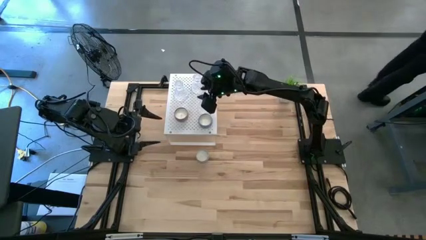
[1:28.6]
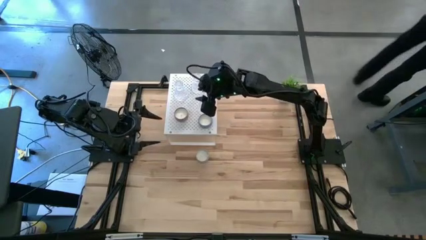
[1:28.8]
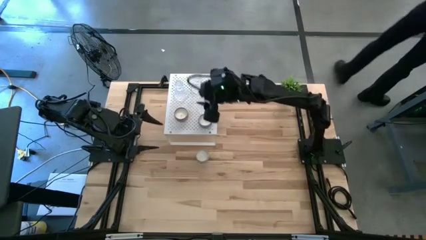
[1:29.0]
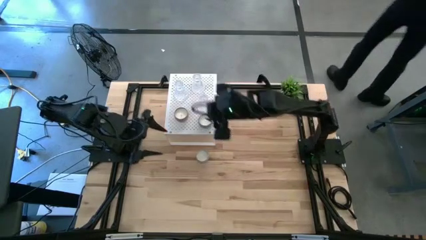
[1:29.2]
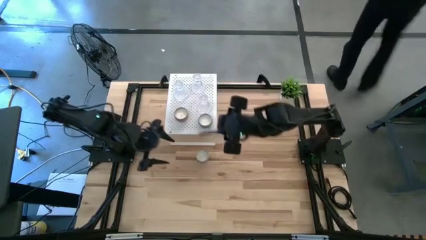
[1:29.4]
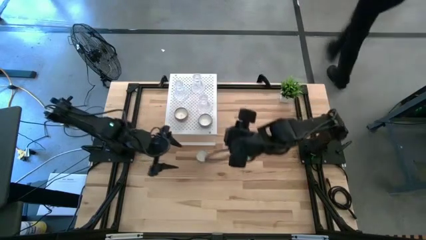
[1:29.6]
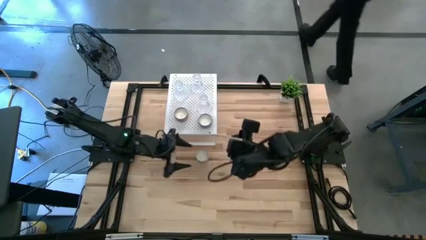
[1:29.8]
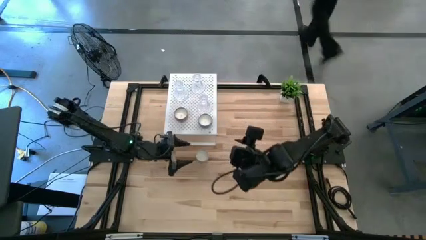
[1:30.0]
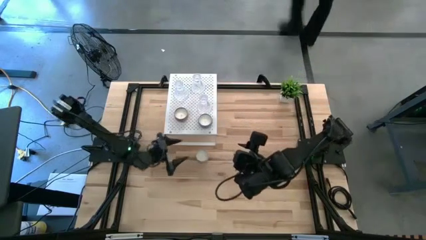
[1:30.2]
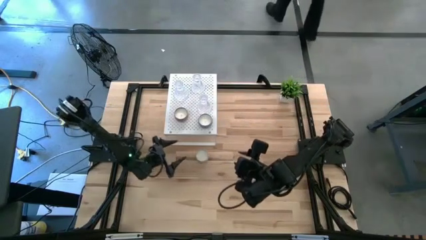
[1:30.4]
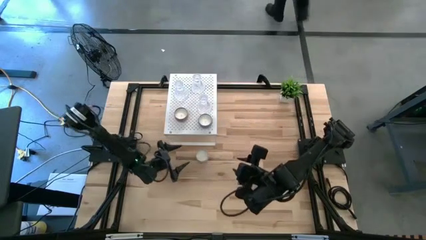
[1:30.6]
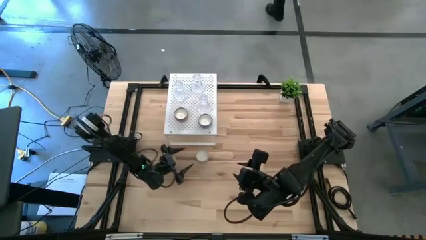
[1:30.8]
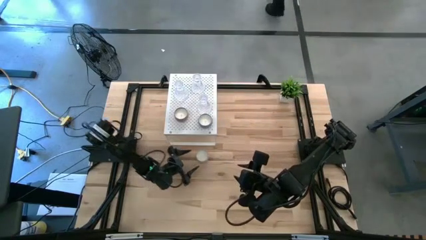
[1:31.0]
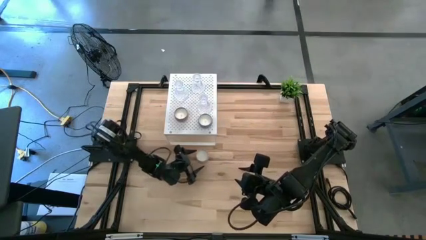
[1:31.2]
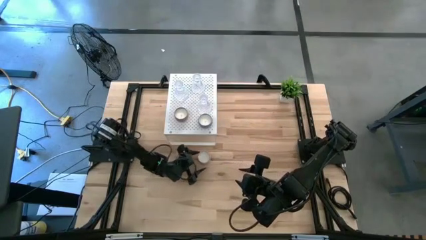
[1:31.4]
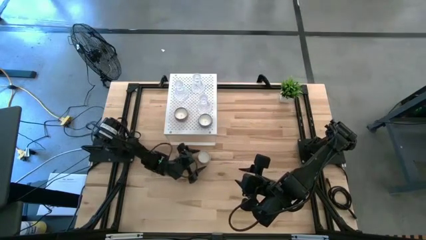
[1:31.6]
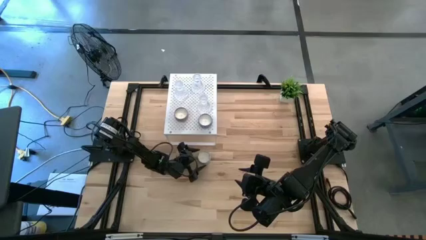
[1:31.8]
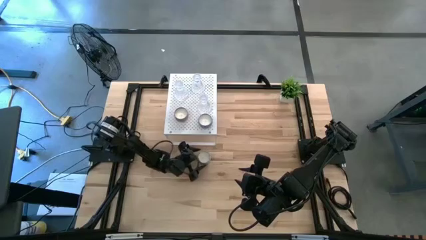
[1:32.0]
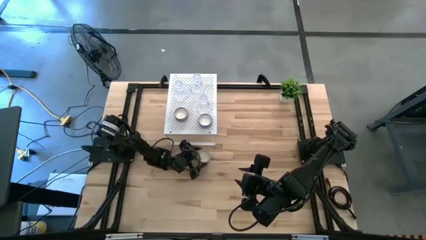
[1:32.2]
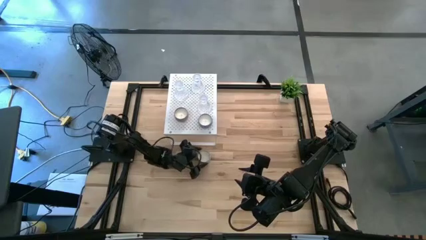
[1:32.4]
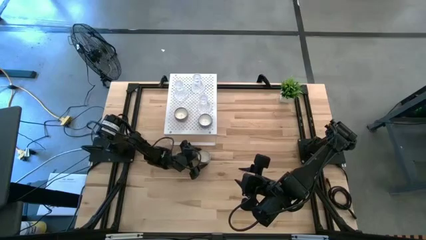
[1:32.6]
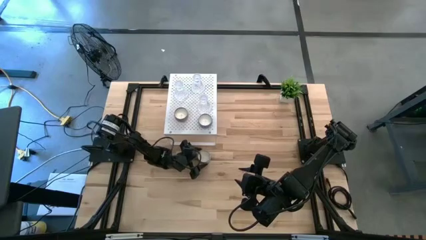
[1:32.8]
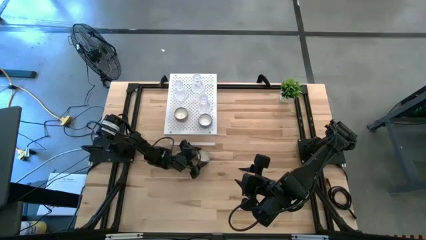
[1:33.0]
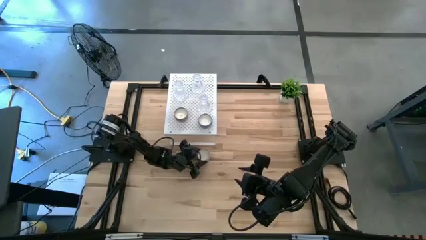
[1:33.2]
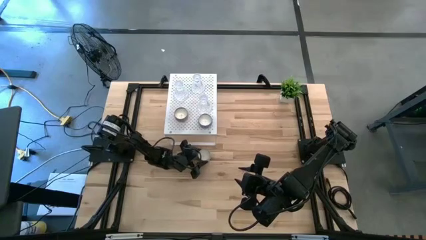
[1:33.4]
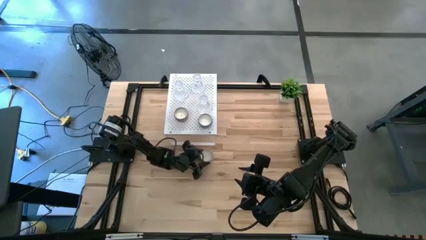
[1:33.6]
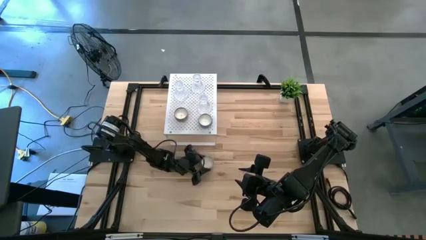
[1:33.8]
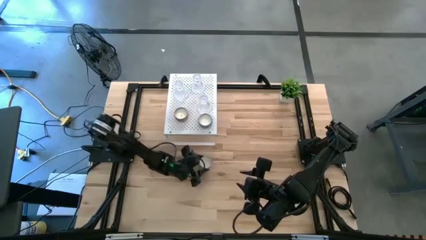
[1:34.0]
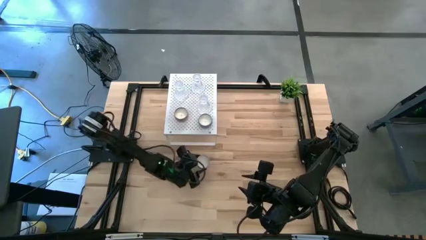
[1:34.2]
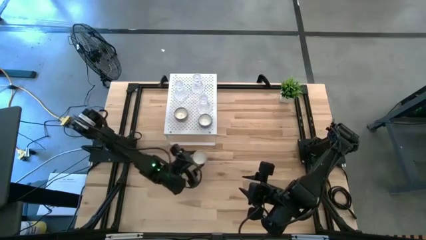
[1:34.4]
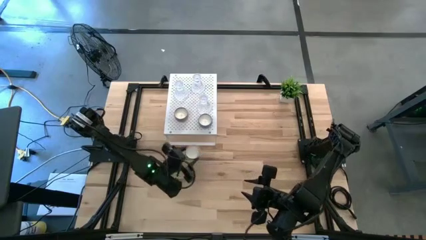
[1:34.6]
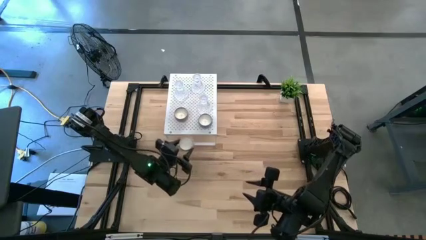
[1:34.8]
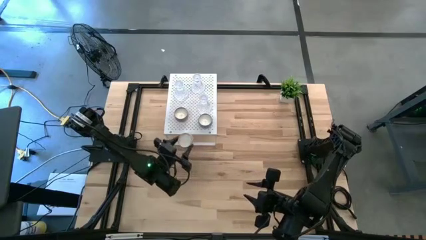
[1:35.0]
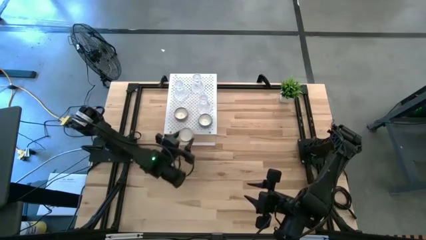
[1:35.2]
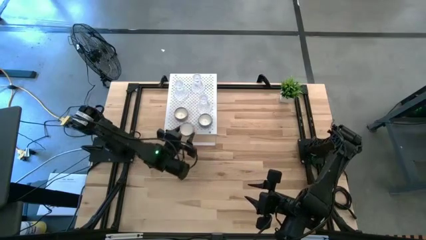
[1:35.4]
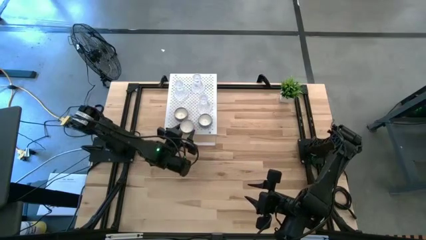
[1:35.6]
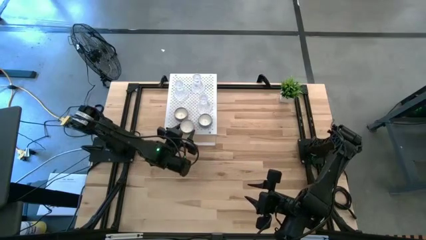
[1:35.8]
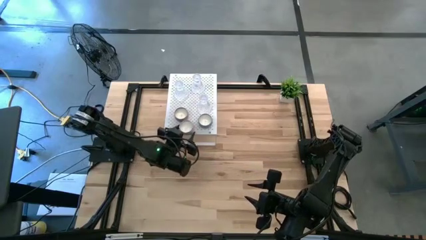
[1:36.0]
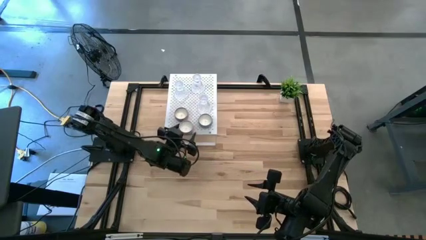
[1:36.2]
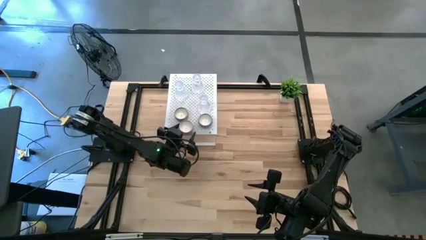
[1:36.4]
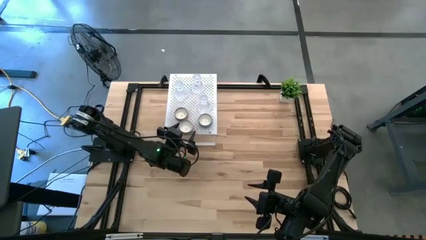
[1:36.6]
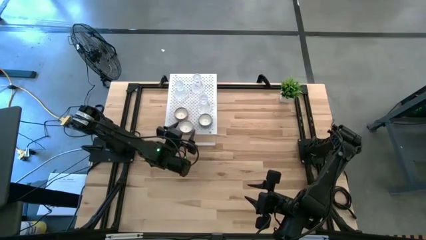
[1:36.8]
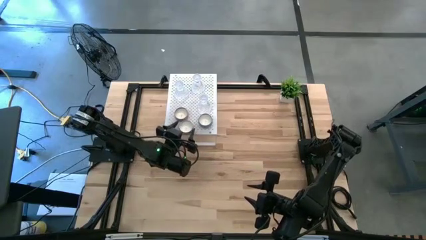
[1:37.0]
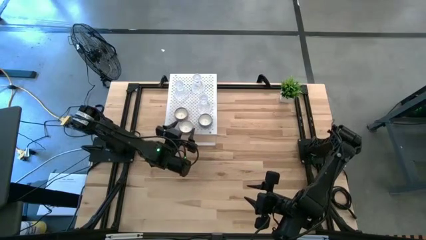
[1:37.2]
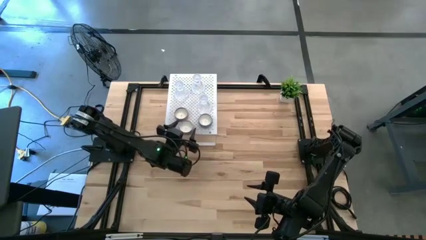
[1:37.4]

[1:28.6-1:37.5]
Task: Pick & Place candle stick holders
Put the red candle on the shelf

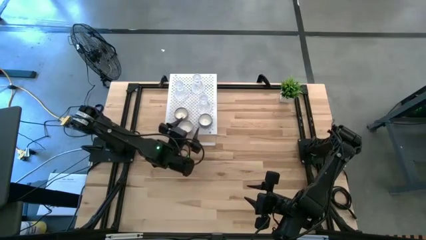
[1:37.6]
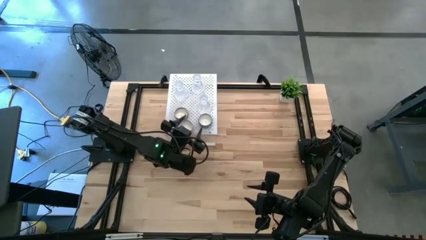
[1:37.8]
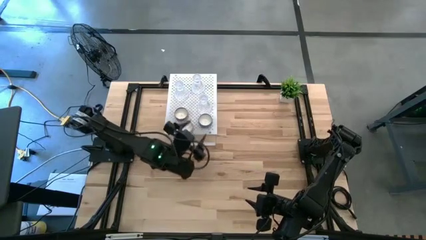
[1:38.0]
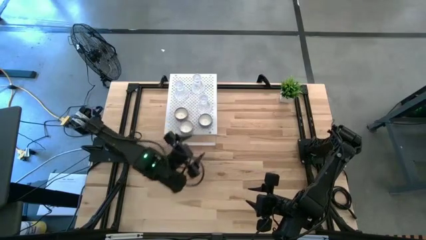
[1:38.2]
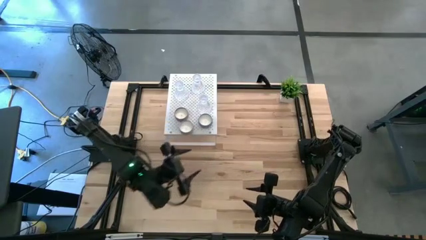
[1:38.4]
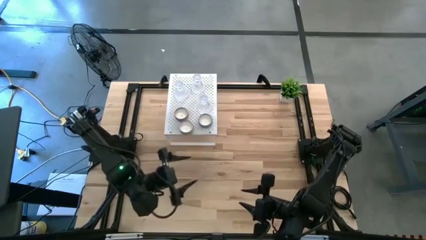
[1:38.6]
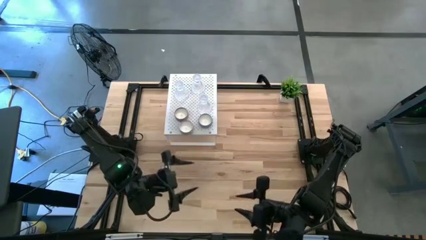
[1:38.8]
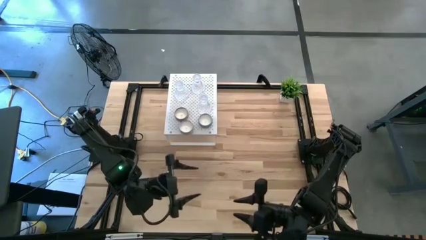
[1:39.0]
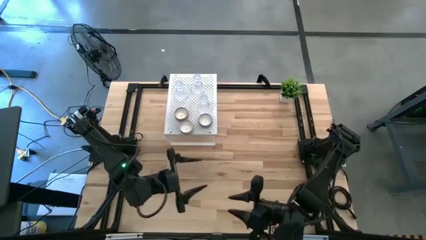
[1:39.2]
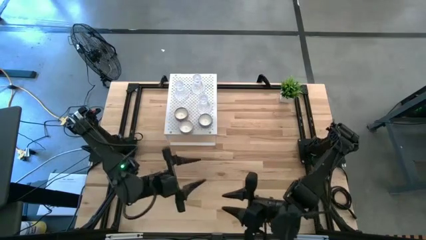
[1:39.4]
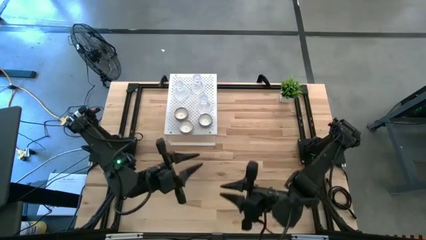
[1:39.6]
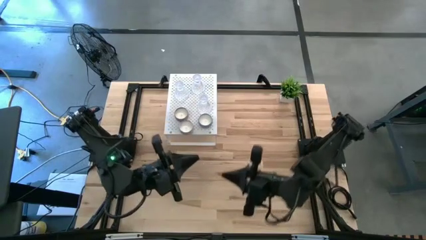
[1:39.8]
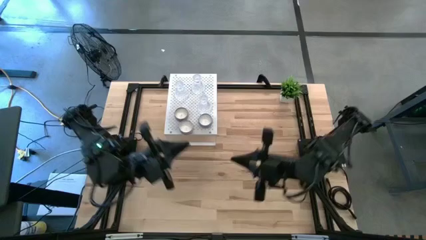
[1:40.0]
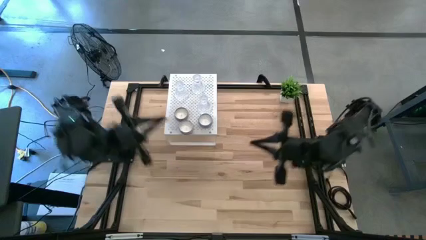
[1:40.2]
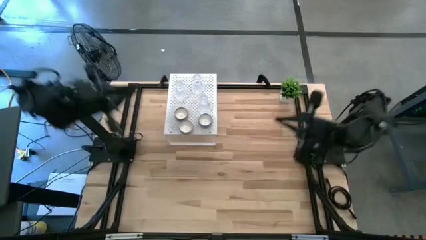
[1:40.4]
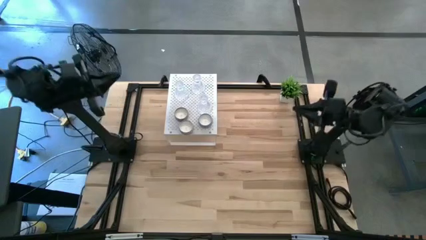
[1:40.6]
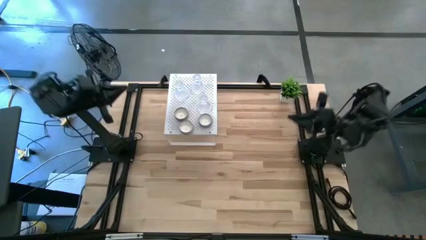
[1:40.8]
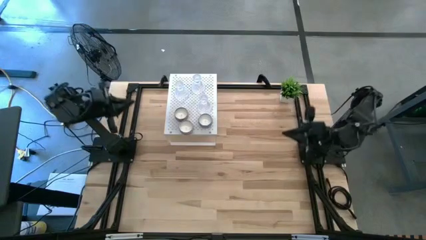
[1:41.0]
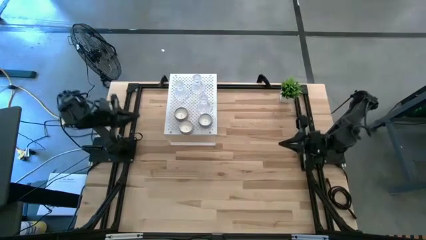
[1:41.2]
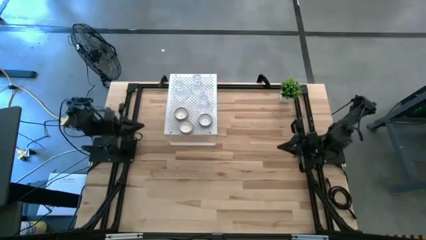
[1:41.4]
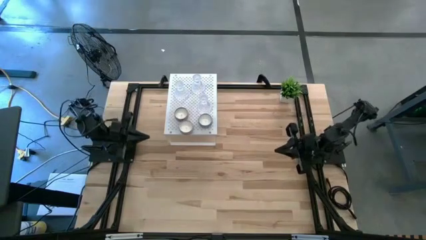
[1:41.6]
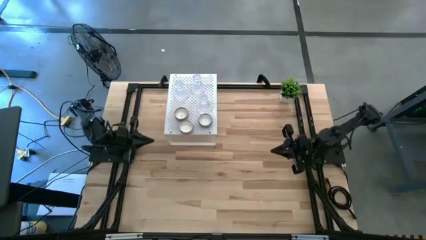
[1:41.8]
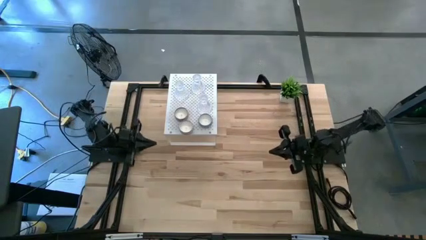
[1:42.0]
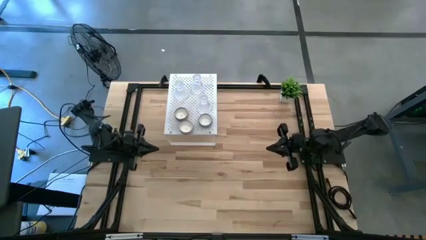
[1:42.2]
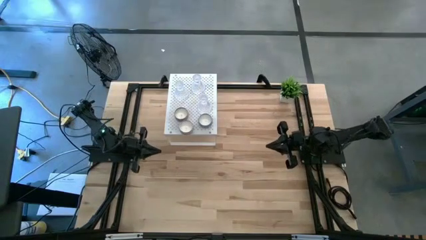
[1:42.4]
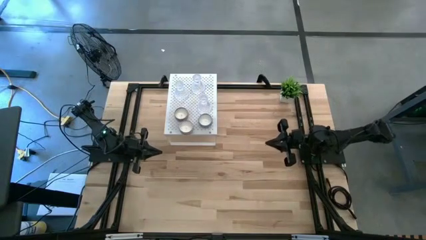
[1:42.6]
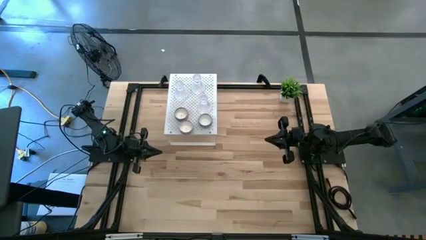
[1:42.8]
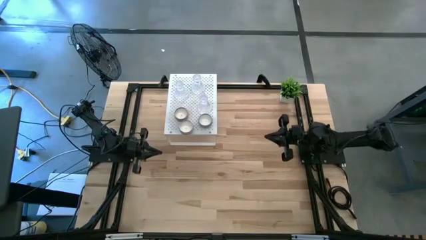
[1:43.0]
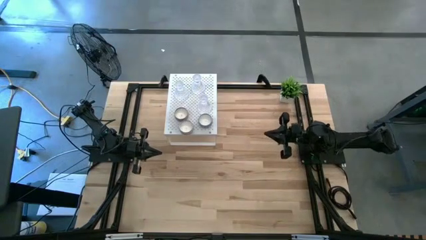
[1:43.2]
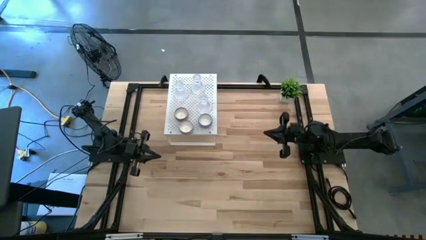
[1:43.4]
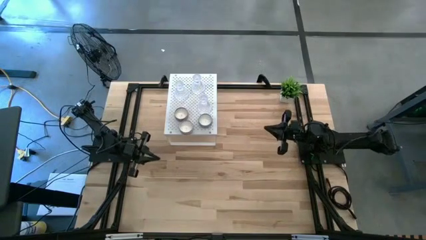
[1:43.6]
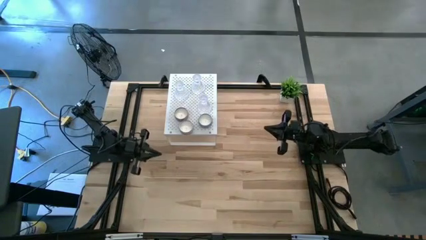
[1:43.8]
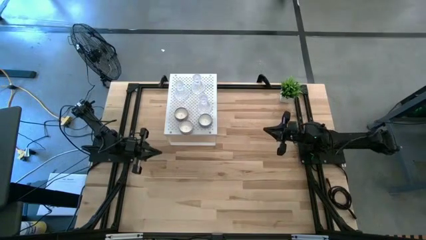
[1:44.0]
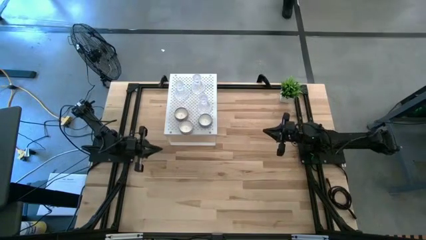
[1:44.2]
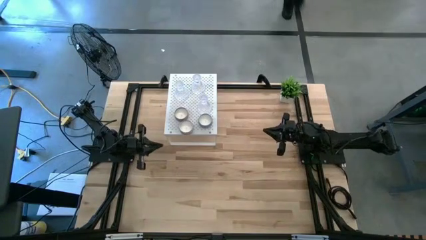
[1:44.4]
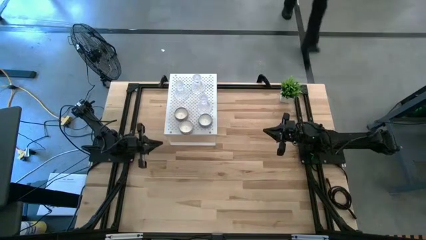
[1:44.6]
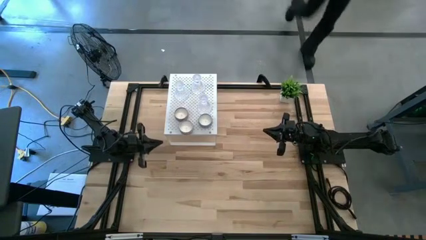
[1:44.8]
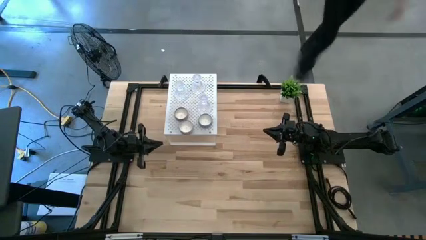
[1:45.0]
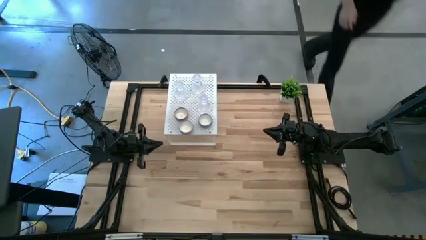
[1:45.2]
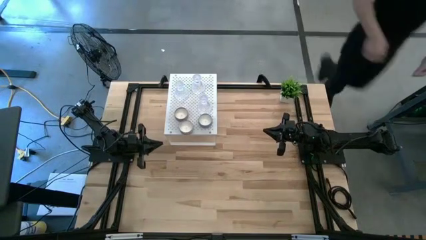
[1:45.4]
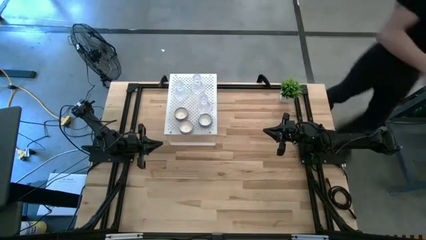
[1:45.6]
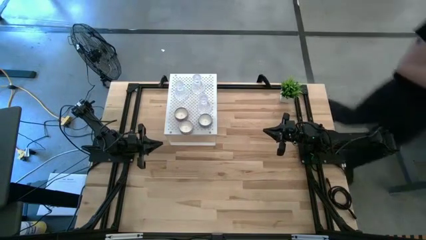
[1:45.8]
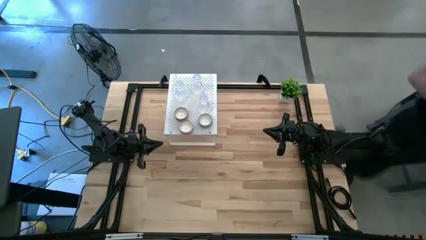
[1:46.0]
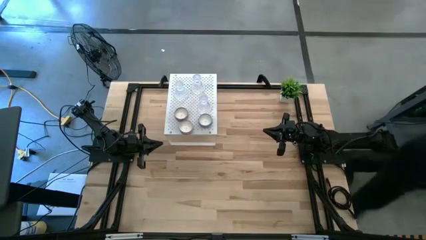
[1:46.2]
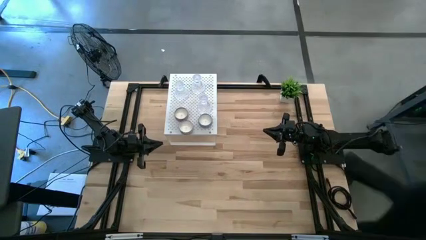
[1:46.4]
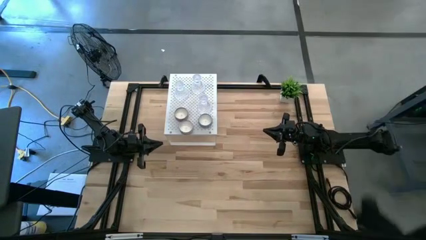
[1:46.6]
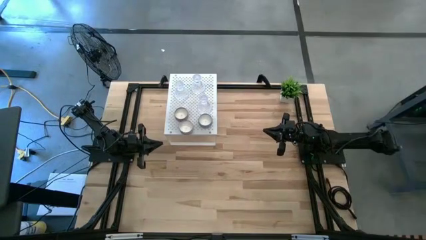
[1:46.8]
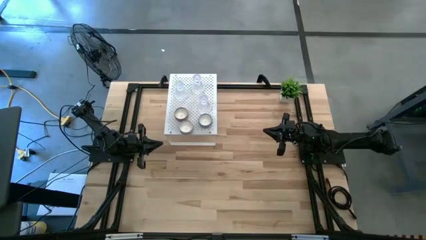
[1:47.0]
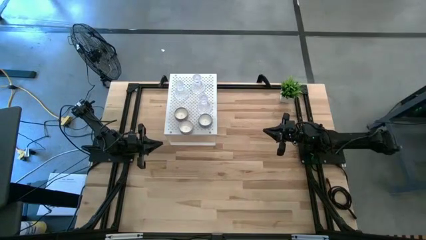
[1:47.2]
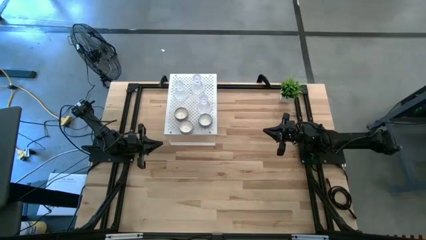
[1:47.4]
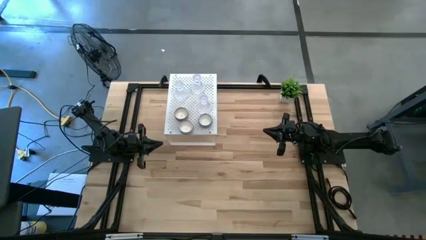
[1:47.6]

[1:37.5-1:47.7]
Return to Home Position
